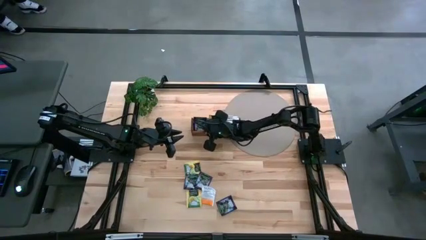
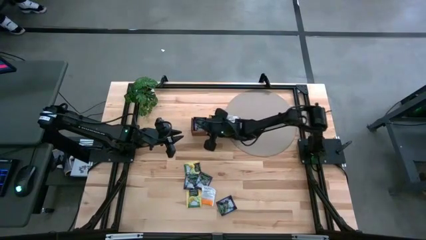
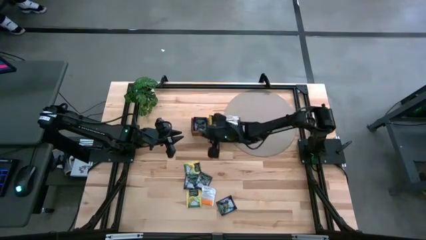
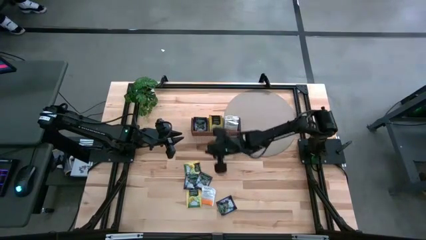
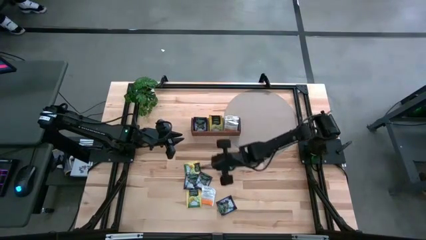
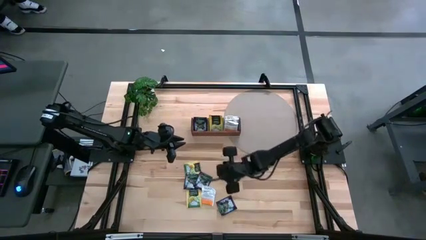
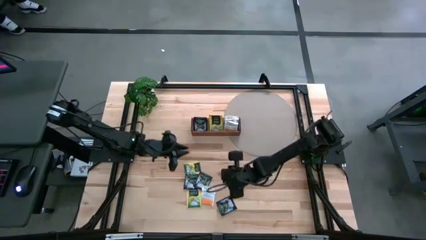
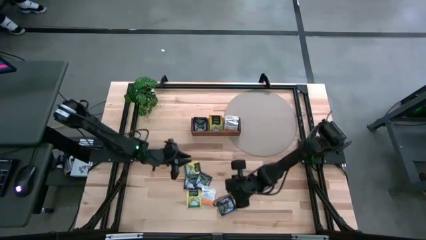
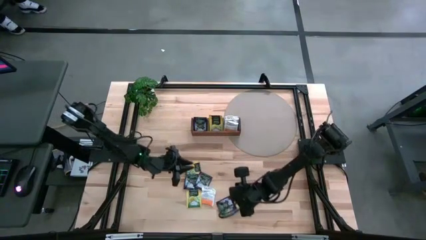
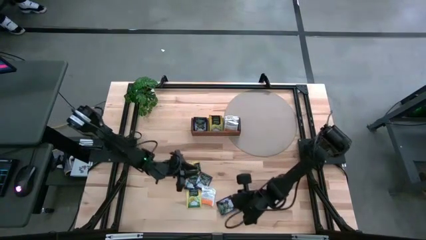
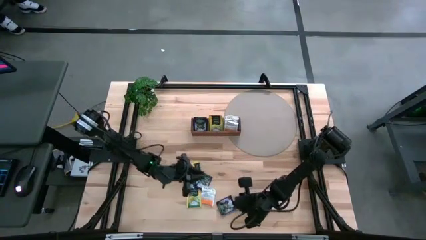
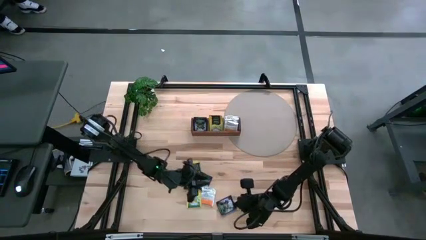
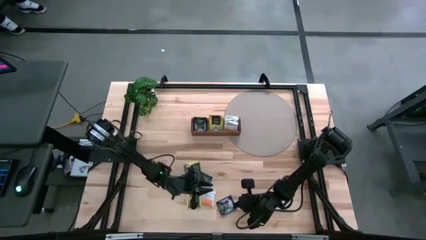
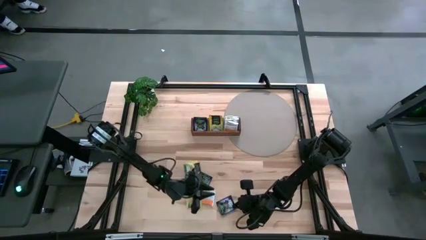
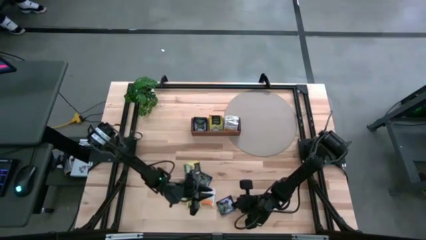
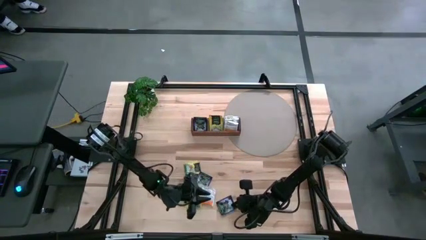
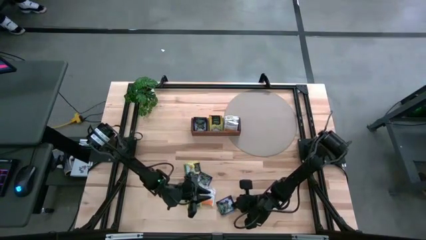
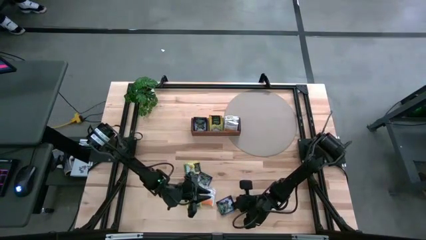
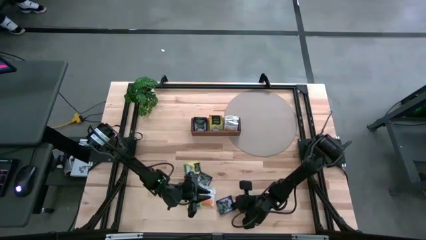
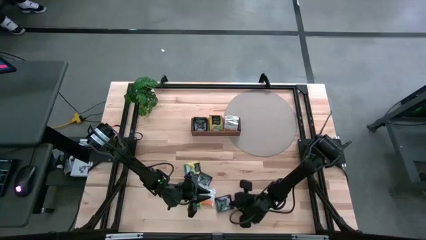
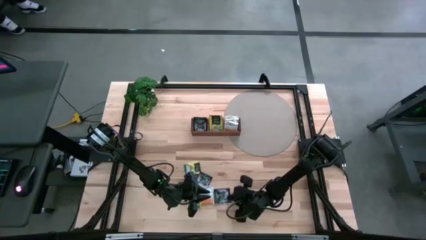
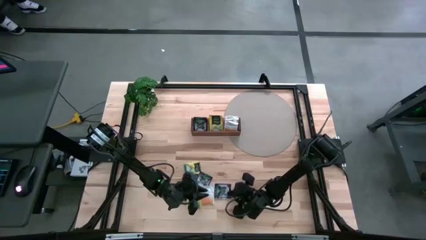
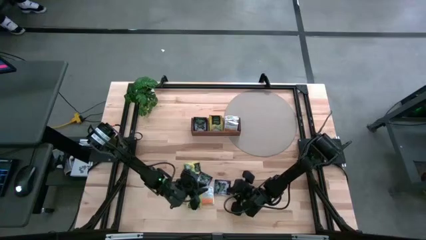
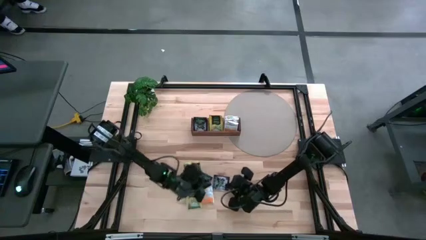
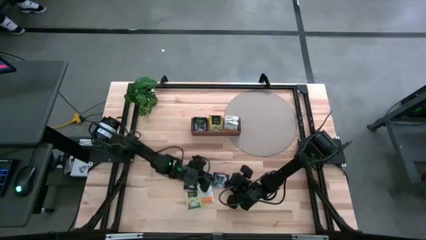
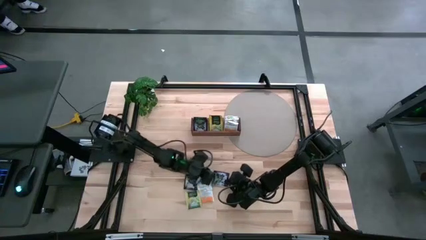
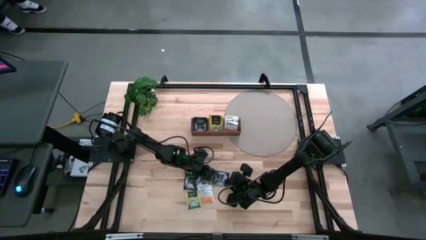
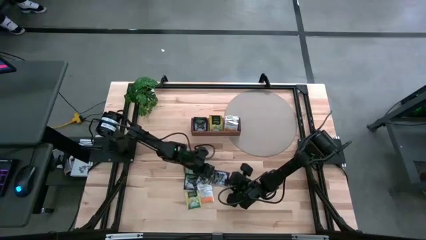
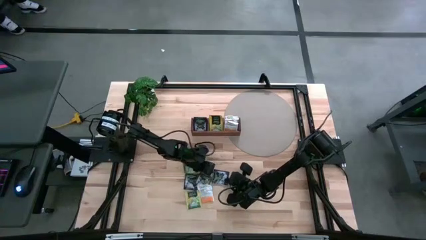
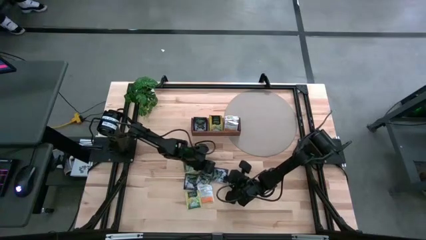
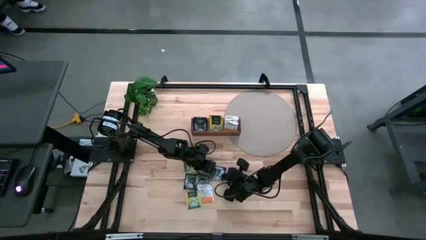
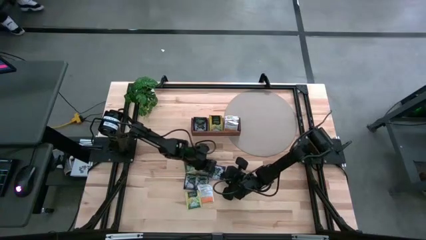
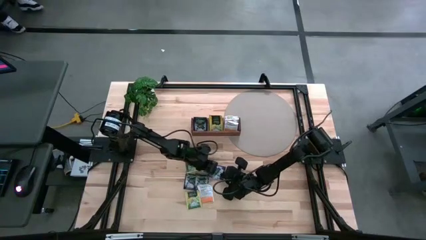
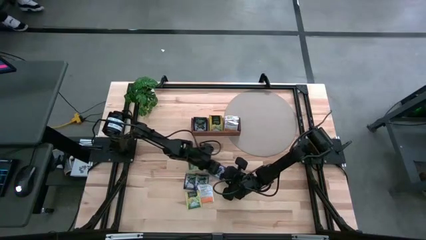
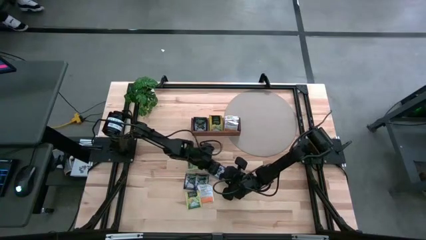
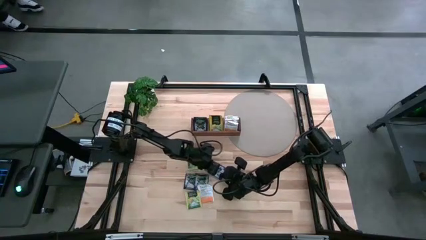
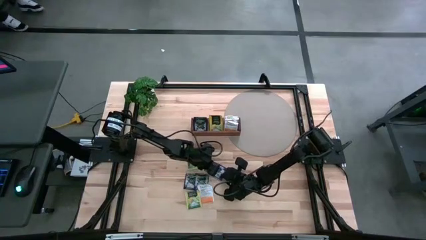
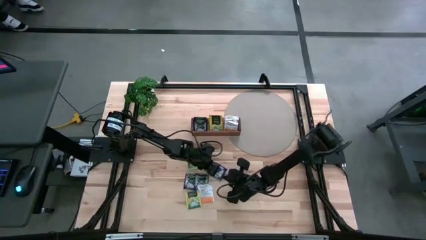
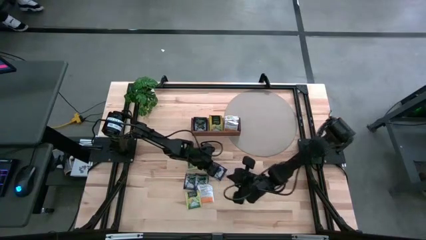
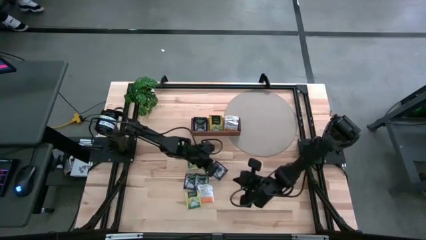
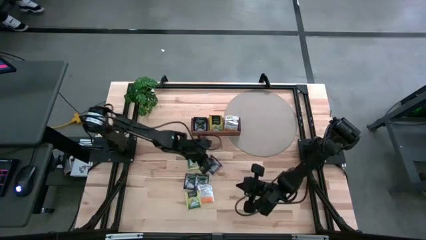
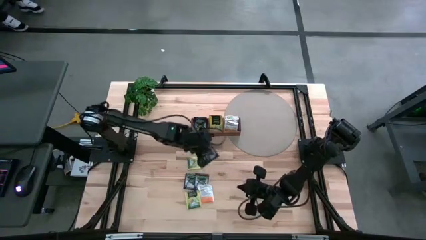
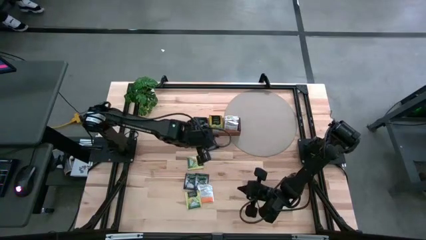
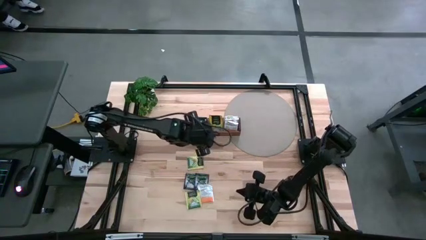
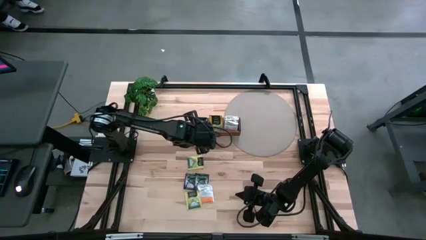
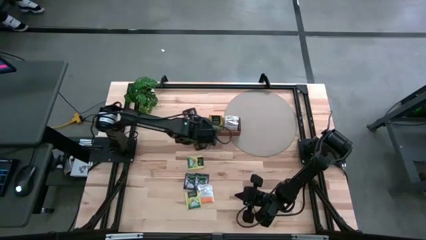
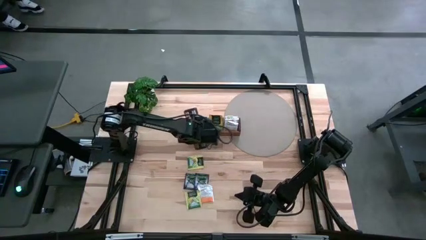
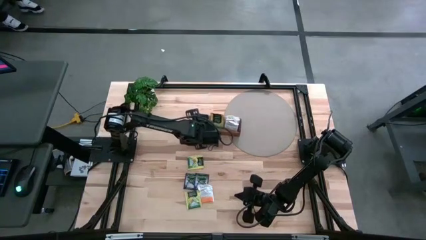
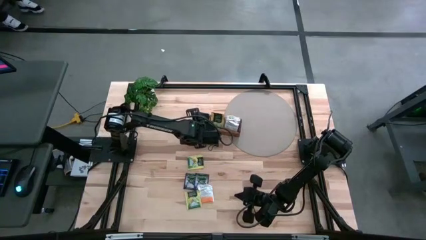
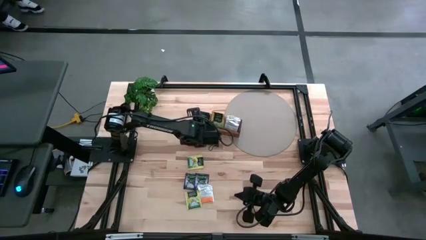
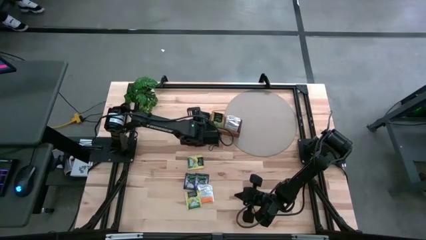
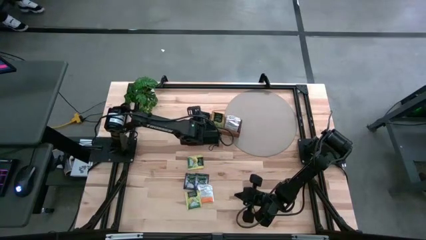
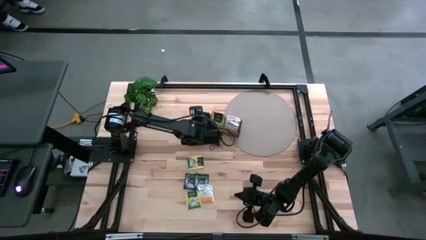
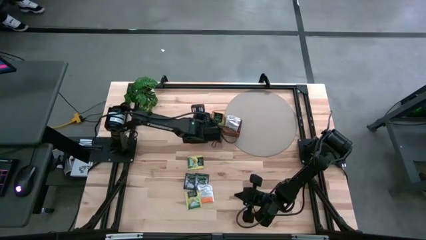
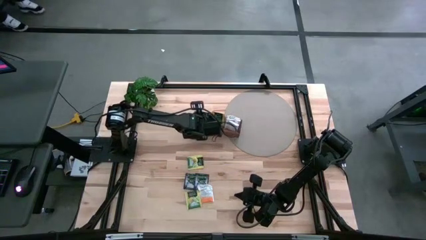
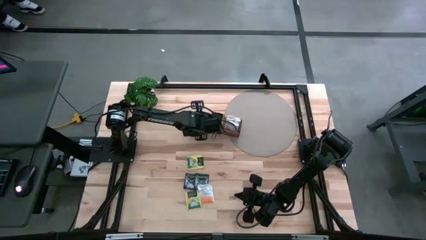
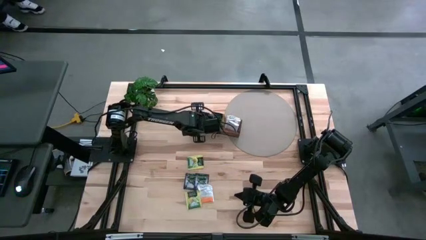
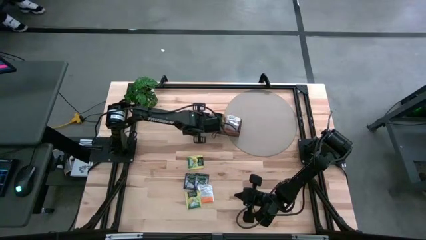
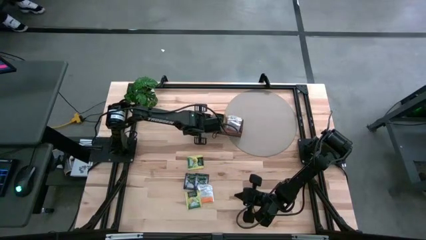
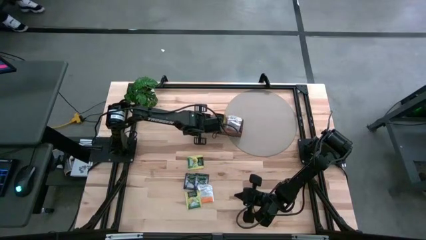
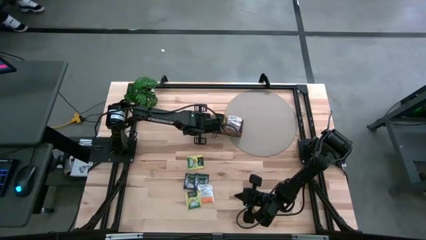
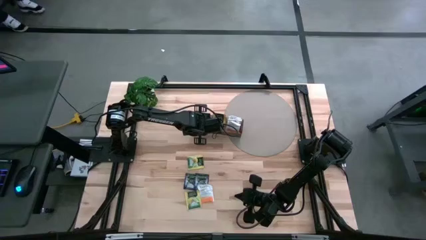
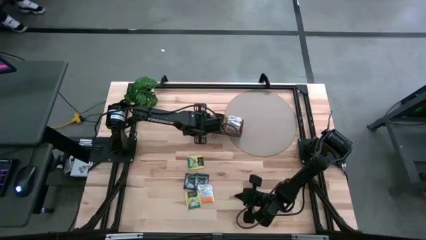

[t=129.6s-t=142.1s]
Task: Pick & Place Tea
Put the violet tea bag into the left section of the wooden organizer
